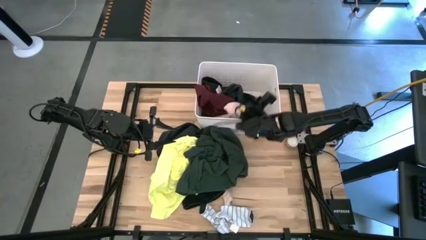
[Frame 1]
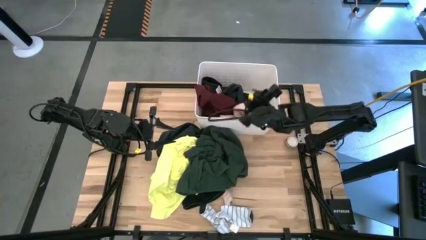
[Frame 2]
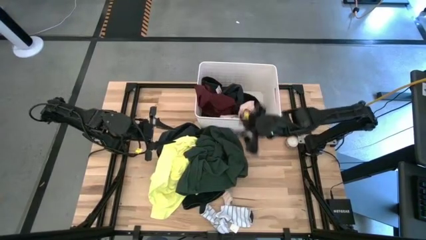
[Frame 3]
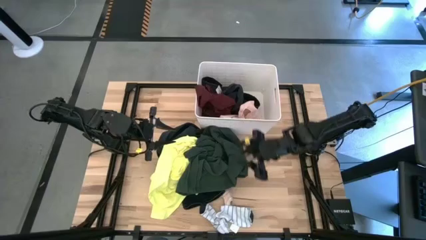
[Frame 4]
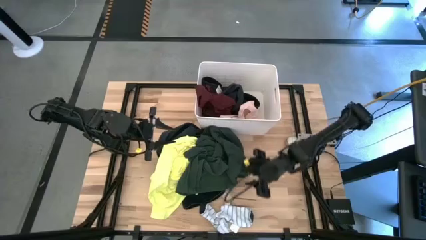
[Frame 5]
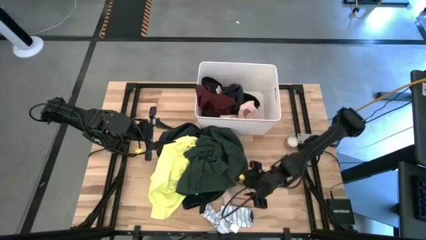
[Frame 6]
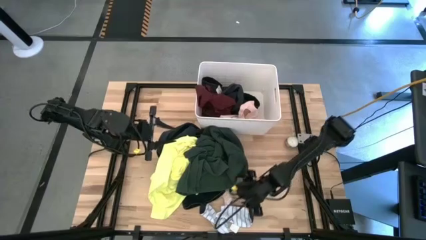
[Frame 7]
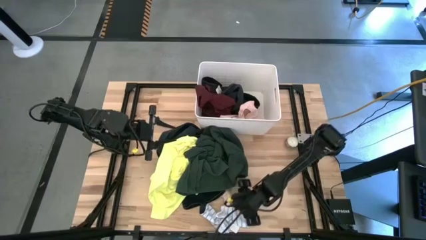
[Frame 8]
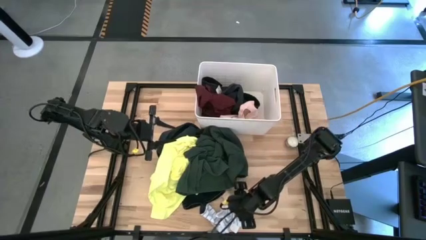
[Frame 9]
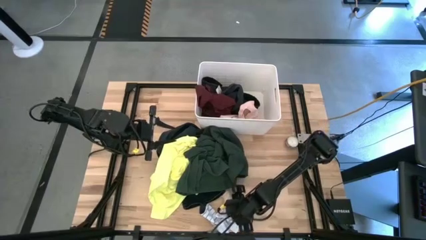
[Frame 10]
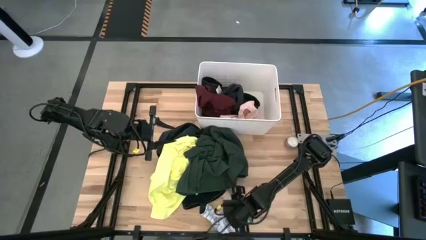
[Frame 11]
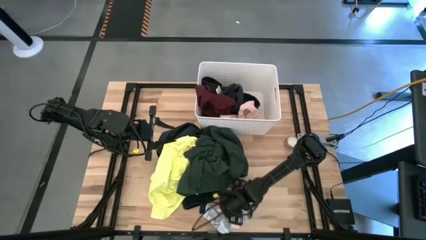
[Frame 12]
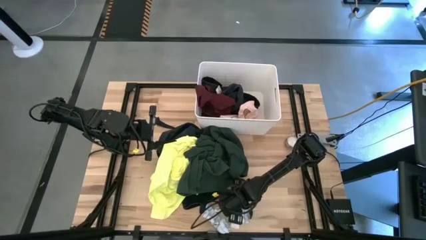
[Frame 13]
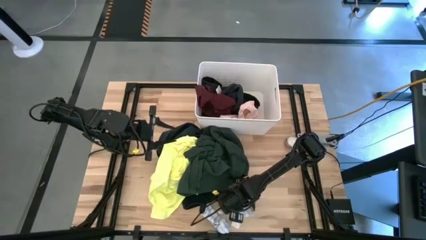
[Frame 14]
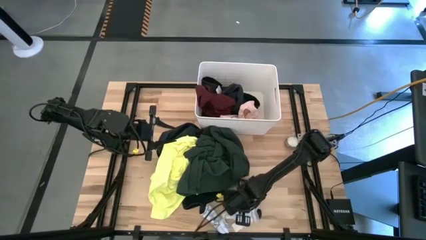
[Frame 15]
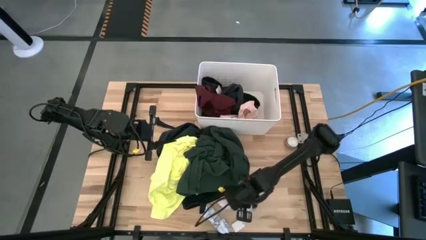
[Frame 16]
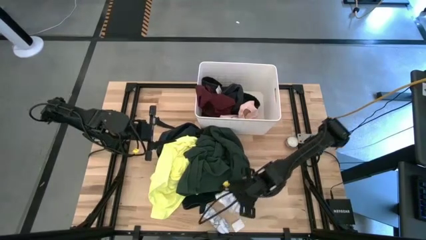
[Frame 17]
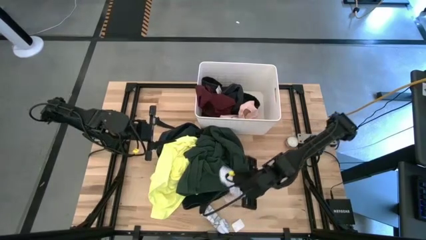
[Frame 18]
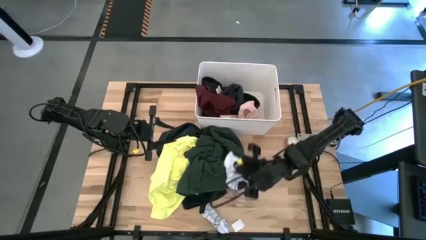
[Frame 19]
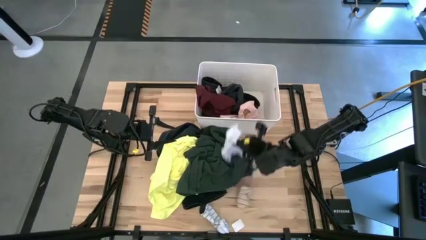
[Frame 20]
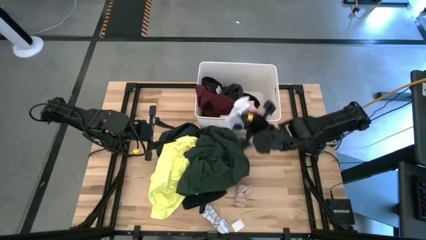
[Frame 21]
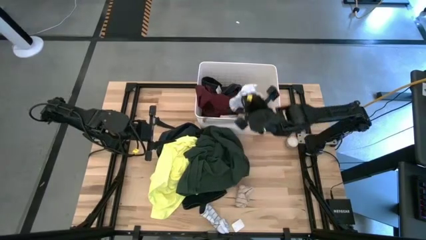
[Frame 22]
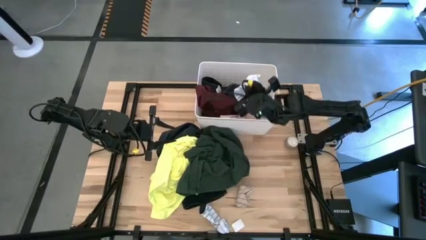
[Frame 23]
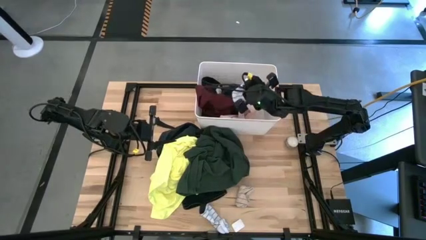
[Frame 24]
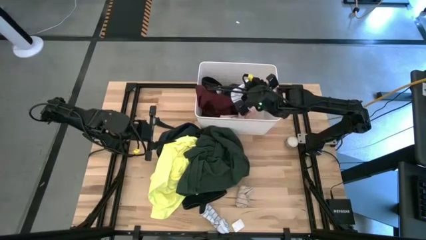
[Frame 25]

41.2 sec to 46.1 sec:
Task: Sort clothes
Put the white/blue sock into the white laundry organizer

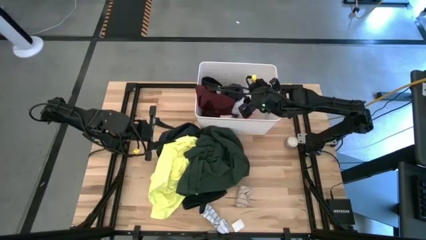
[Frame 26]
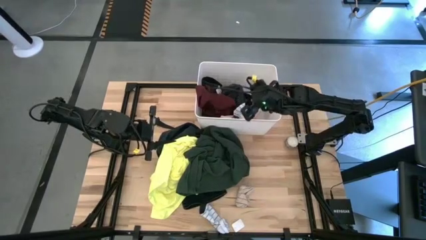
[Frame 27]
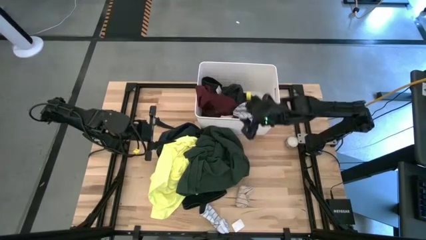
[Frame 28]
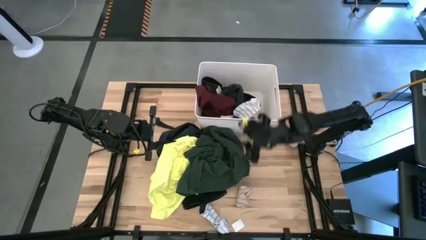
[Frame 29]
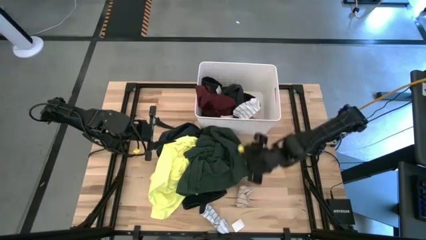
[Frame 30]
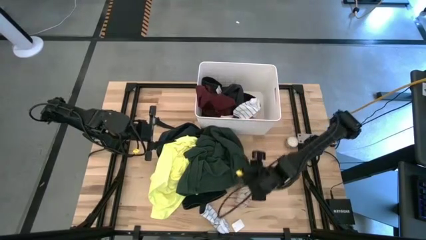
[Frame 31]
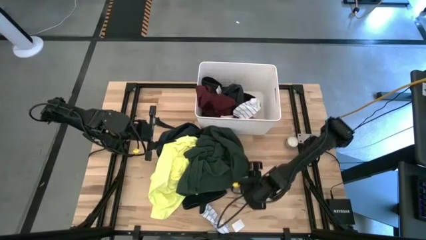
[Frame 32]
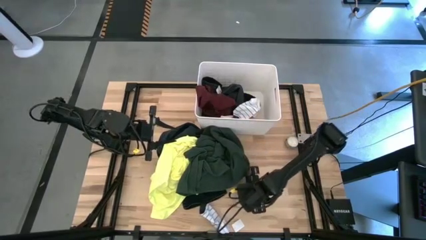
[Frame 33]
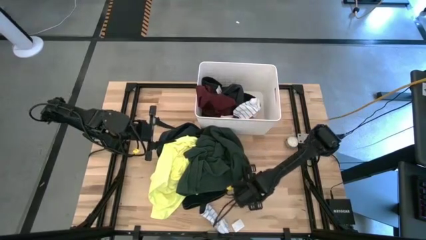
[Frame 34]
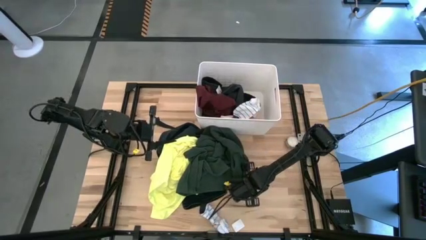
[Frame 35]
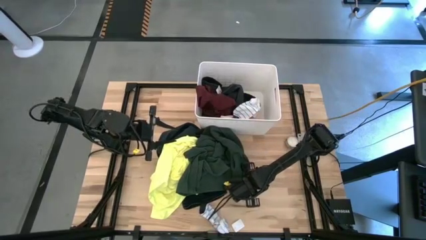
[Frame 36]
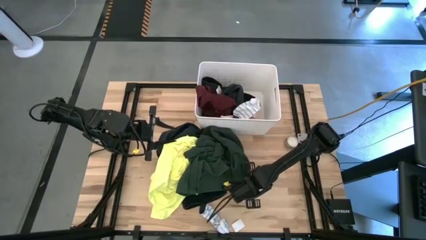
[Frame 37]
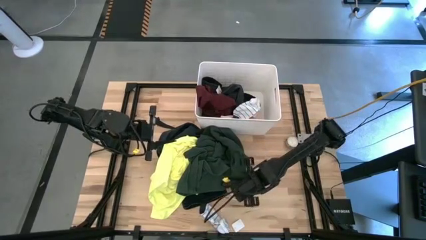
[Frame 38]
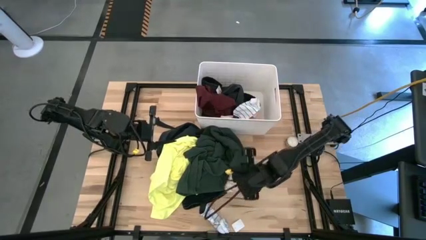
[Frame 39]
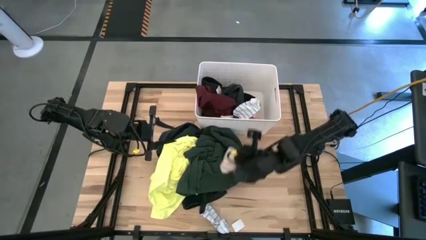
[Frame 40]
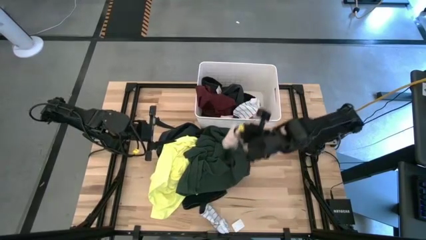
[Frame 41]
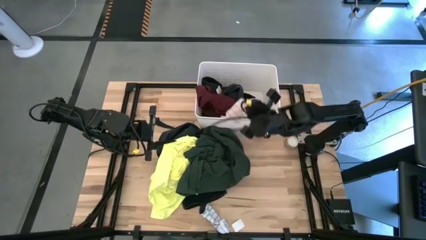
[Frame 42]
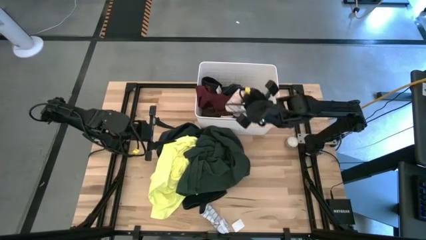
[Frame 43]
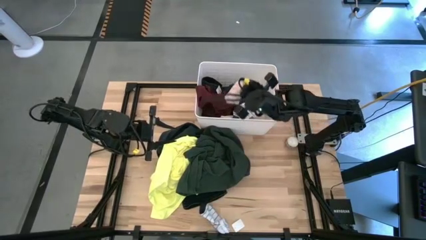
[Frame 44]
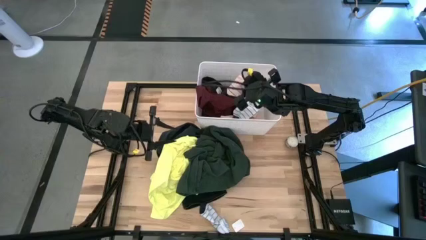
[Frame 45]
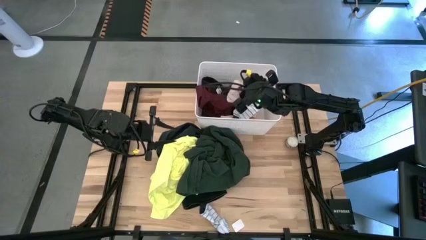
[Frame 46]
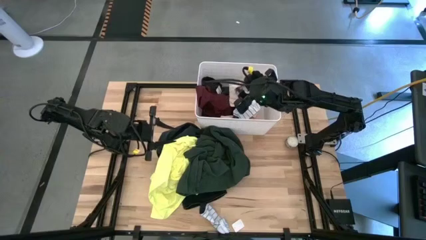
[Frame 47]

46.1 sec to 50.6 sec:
Put the white/pink sock into the white laundry organizer

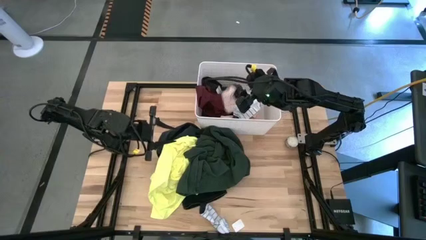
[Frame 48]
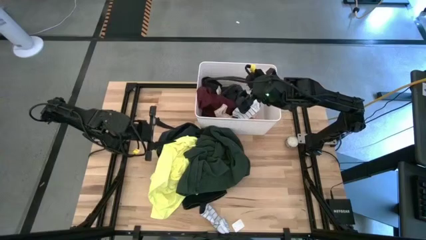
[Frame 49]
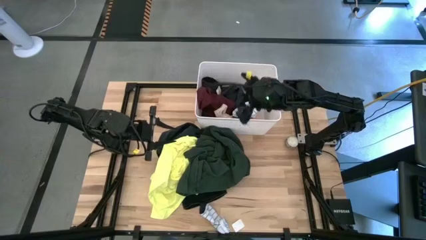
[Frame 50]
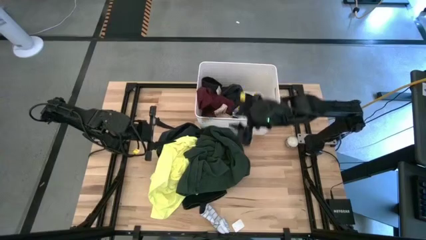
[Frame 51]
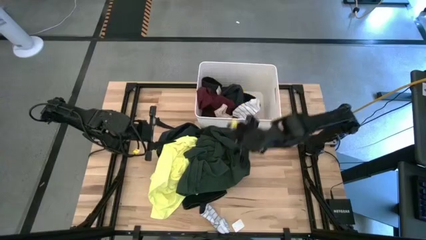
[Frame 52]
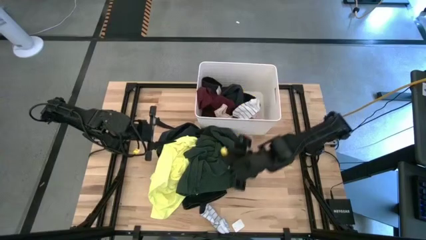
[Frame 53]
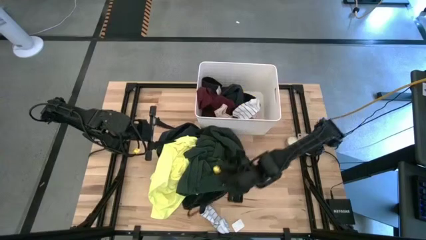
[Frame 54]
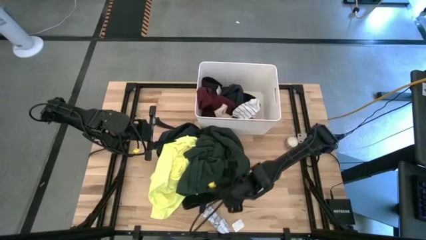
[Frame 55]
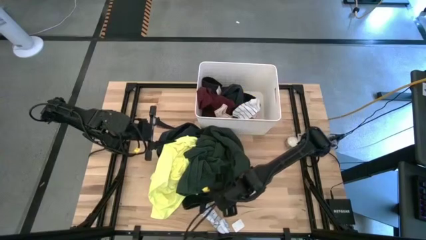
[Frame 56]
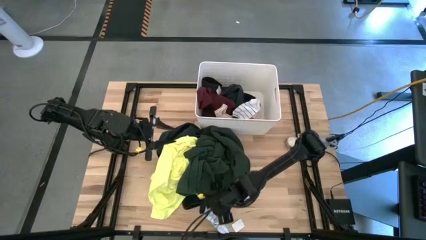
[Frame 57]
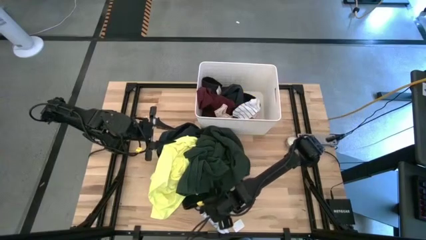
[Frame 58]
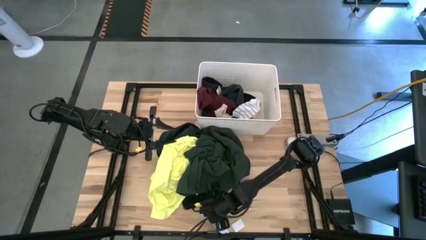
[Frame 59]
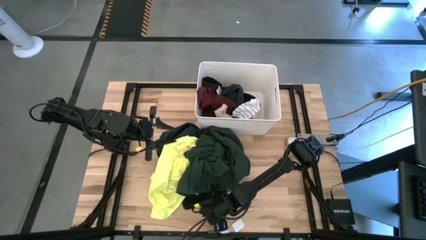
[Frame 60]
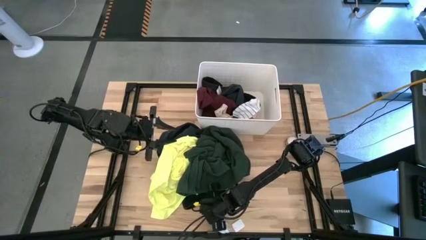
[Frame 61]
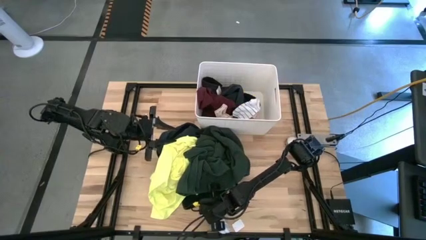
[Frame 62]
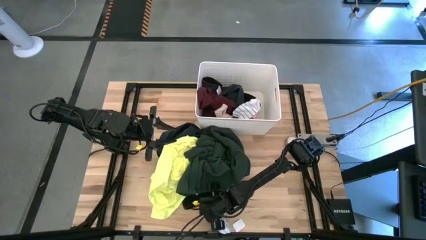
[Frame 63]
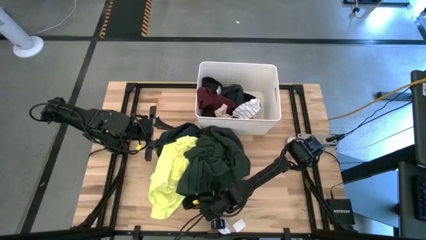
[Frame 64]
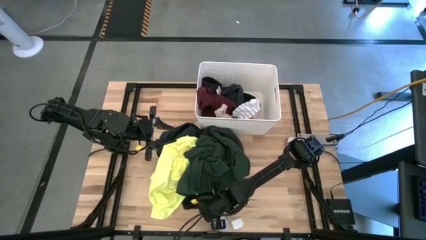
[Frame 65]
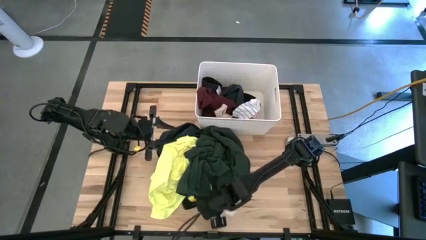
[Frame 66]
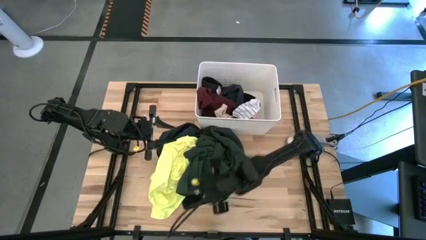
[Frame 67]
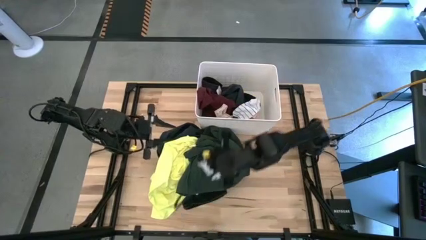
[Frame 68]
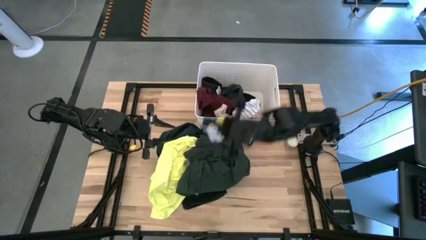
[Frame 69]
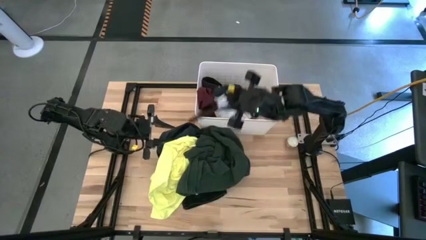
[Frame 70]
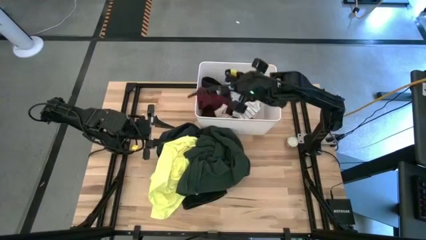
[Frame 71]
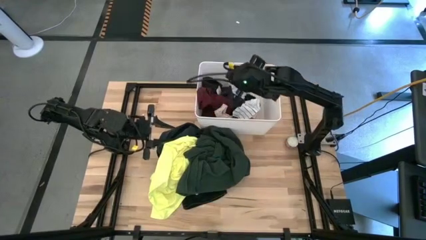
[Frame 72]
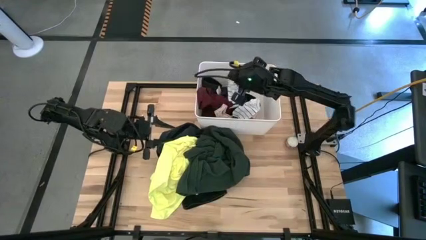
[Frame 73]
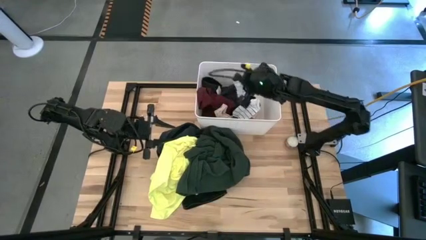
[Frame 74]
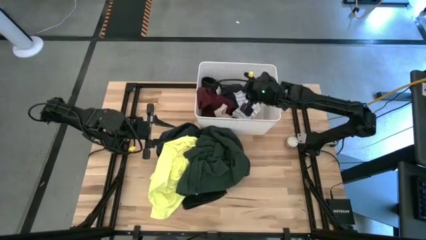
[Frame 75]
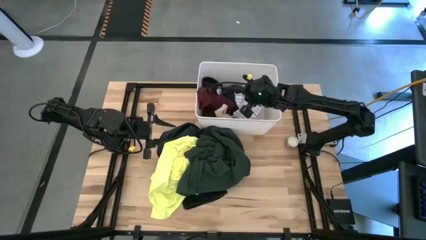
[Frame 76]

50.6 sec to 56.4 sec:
Put the white/blue sock into the white laundry organizer

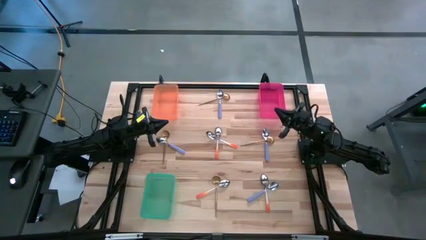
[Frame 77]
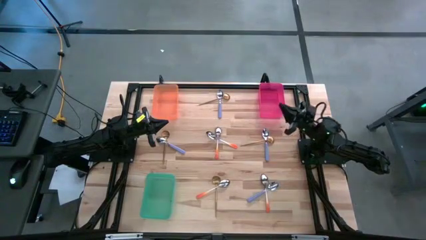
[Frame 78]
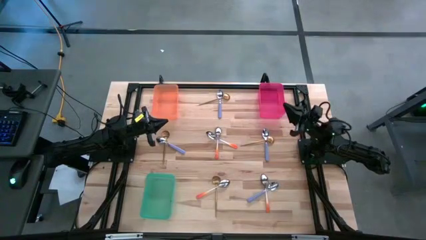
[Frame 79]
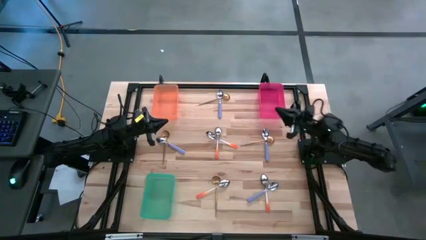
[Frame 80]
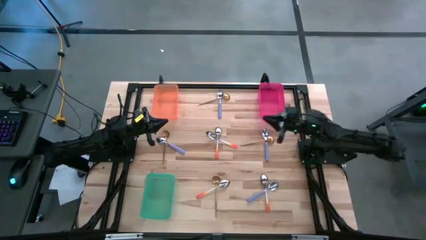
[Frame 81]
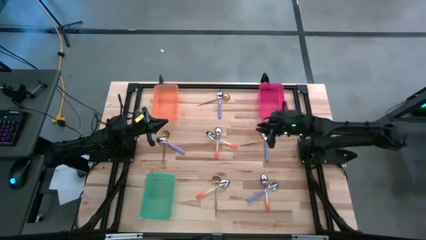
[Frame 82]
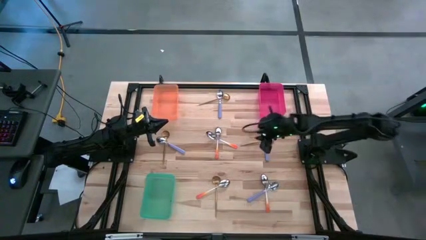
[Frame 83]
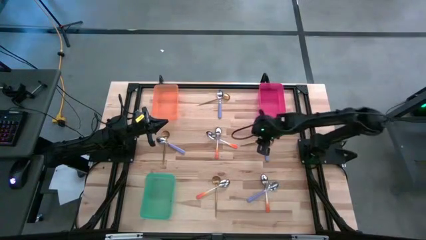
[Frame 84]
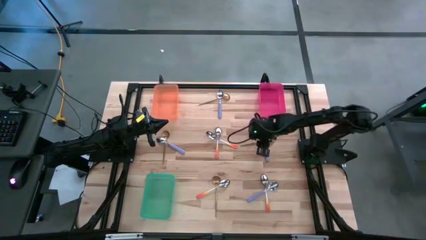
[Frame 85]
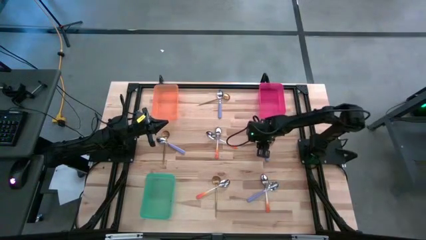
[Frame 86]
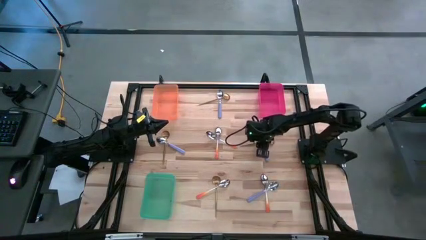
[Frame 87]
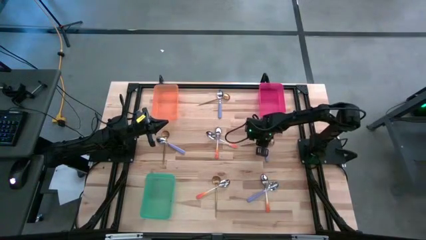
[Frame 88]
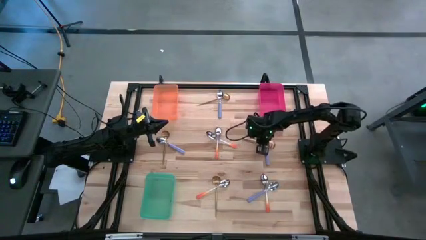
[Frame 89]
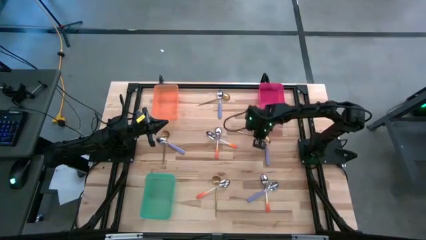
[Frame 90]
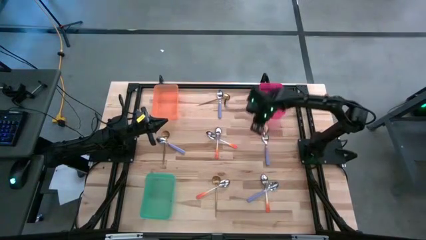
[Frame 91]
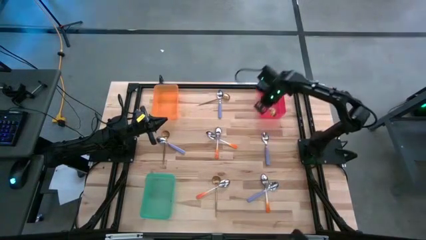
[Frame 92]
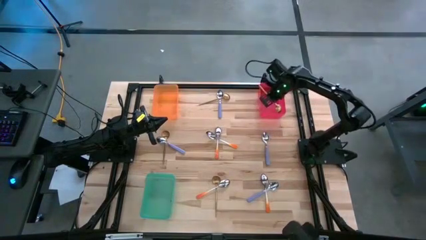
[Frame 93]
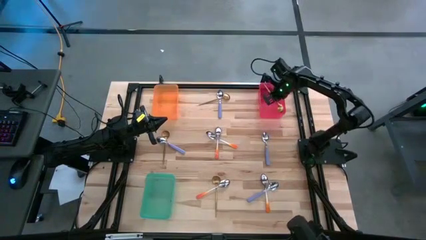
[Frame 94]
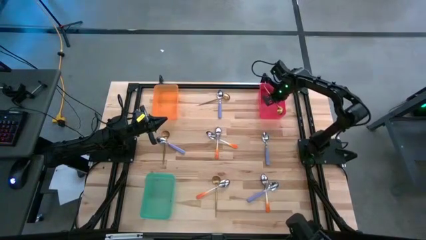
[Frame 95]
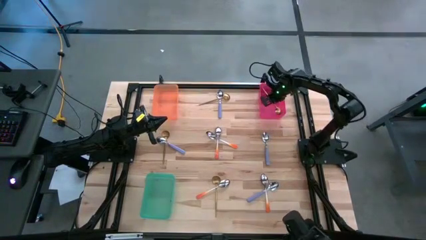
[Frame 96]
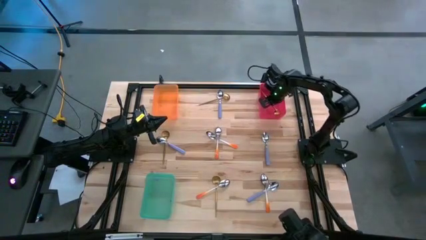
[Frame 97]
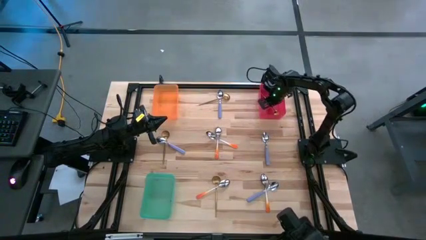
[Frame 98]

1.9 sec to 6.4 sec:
Task: Sort silverware by color (type)
Put the gold spoon into the pink bin
